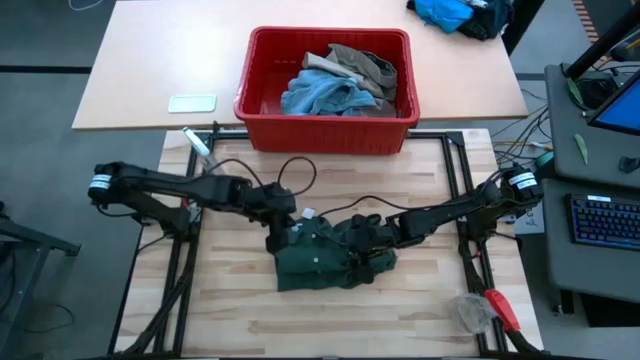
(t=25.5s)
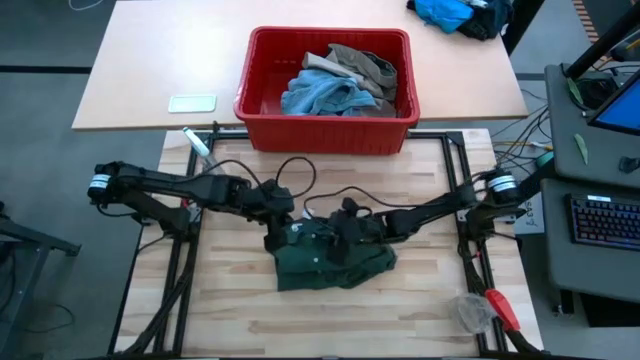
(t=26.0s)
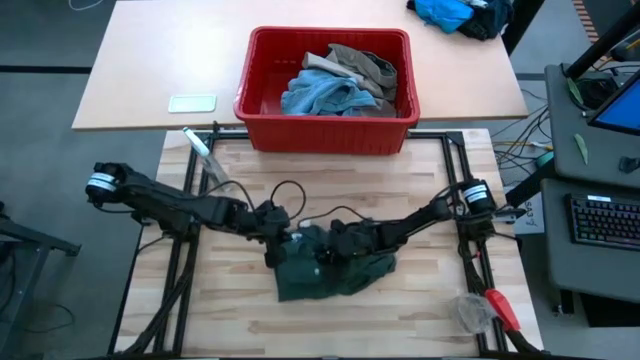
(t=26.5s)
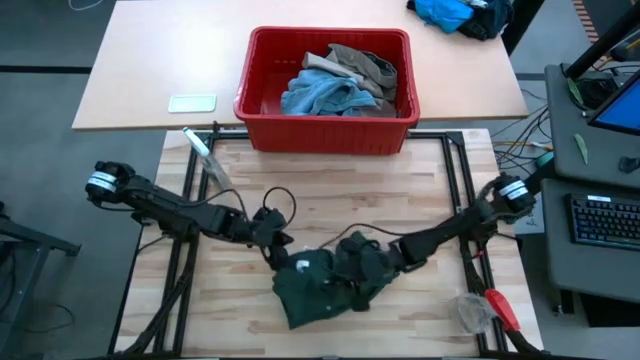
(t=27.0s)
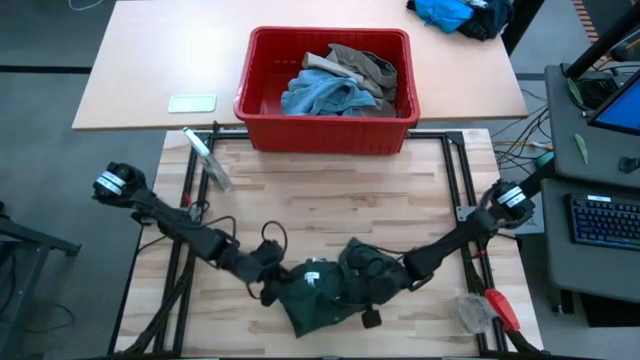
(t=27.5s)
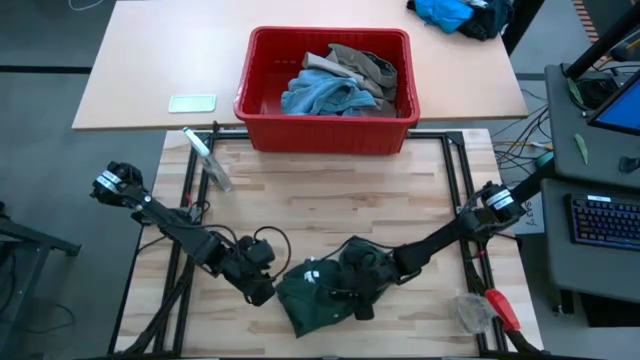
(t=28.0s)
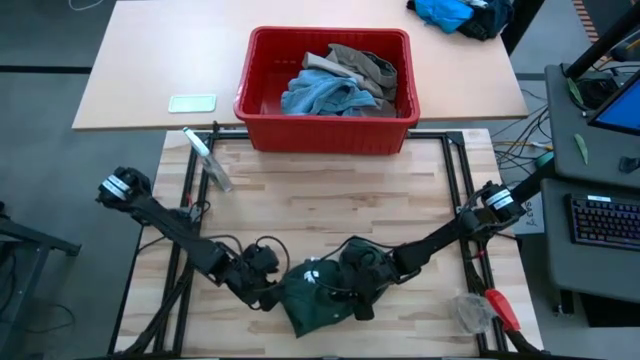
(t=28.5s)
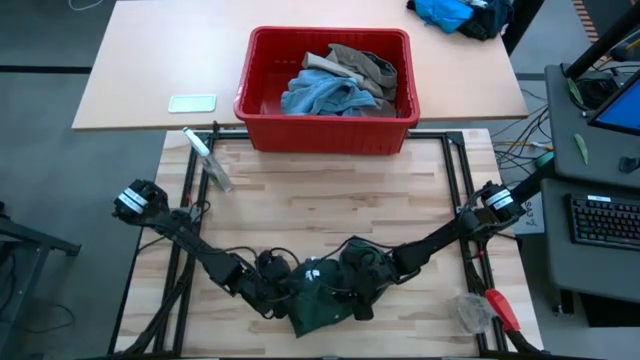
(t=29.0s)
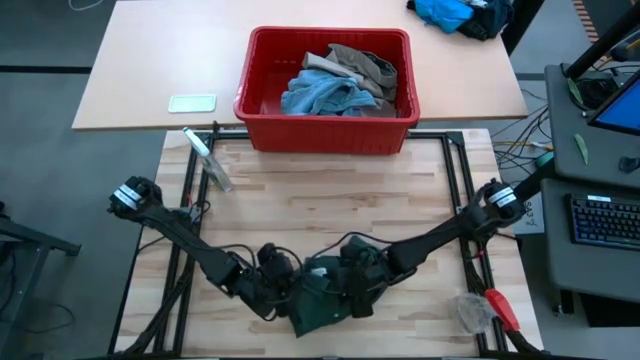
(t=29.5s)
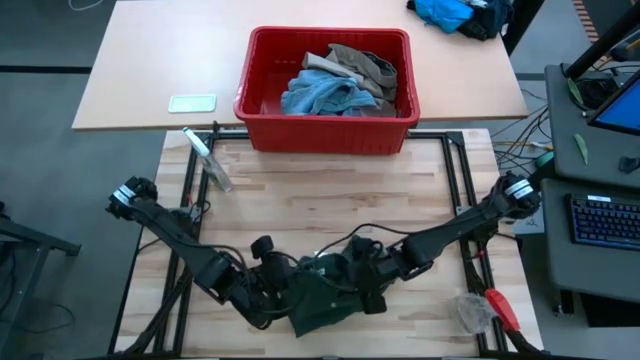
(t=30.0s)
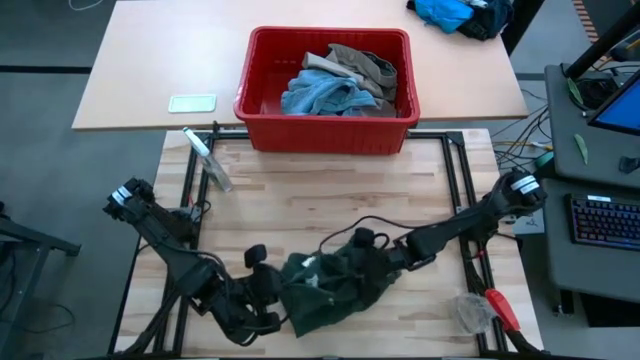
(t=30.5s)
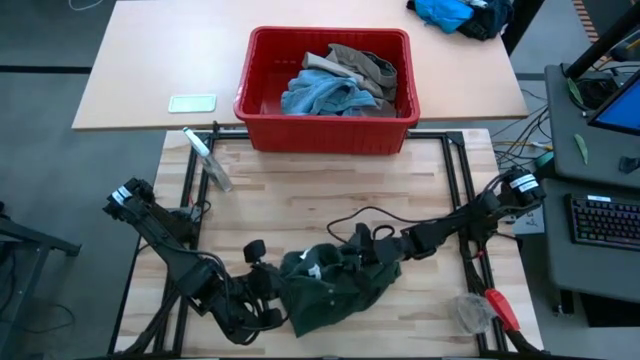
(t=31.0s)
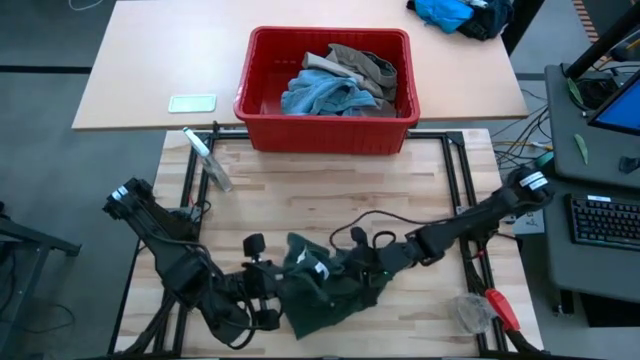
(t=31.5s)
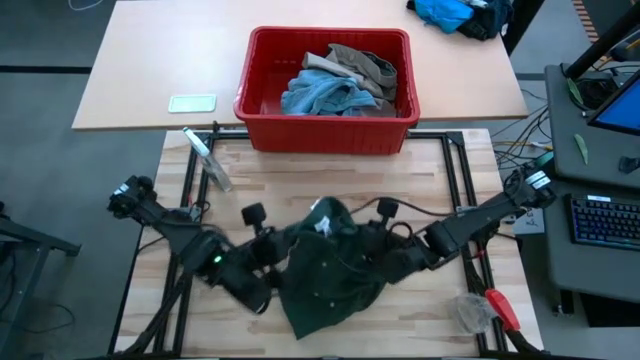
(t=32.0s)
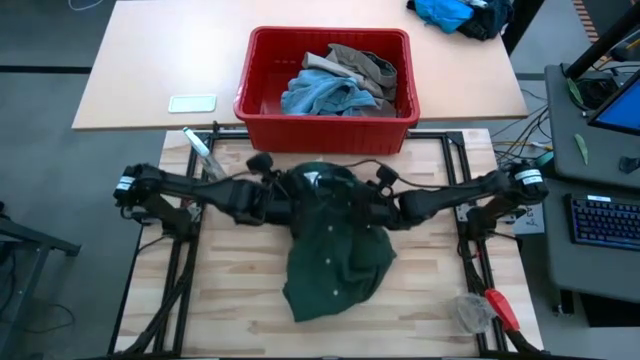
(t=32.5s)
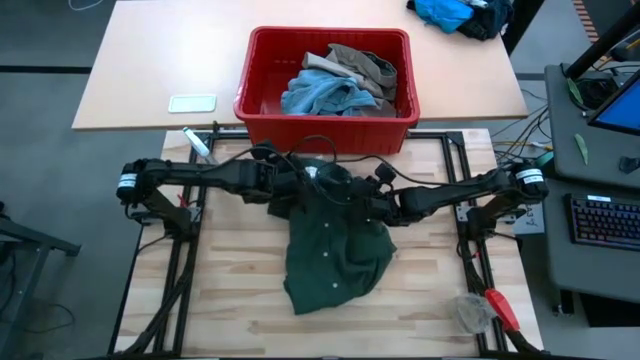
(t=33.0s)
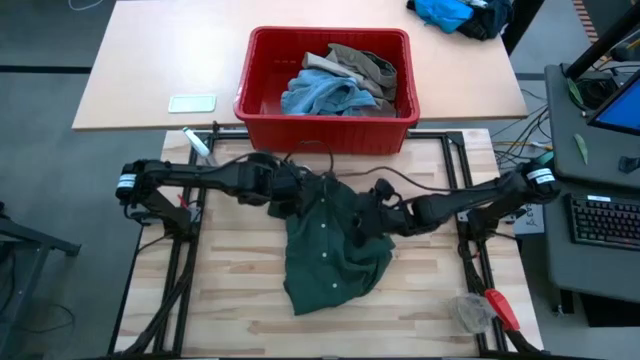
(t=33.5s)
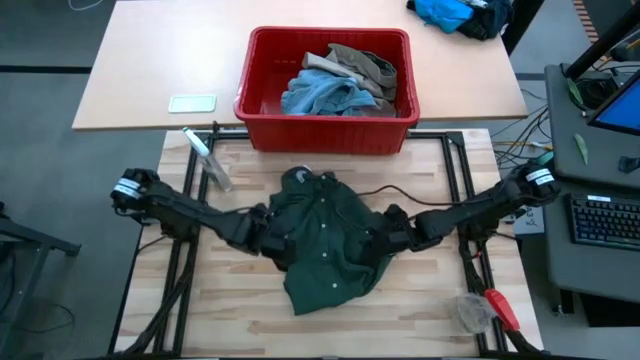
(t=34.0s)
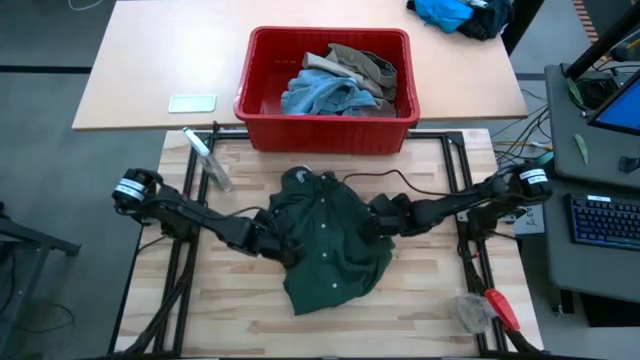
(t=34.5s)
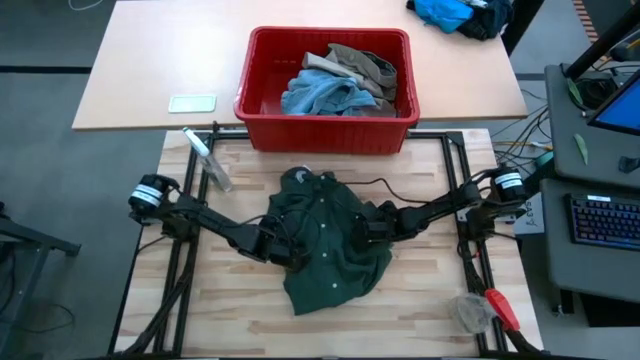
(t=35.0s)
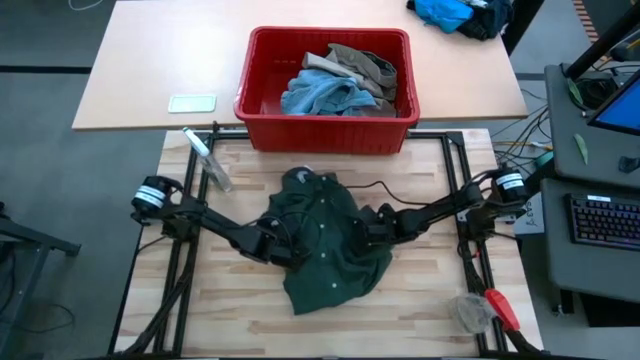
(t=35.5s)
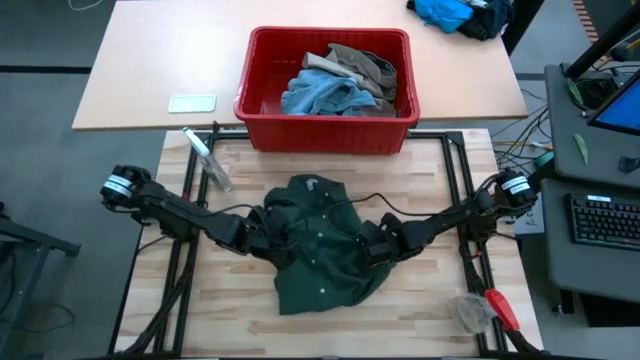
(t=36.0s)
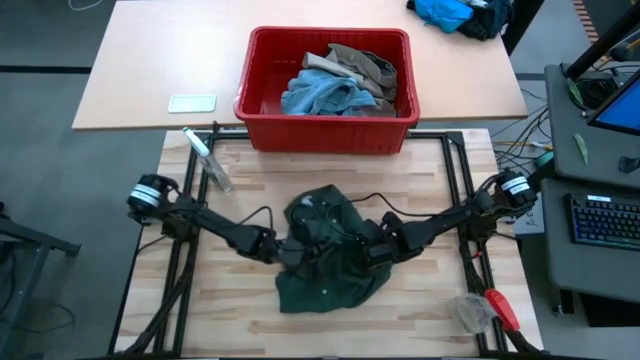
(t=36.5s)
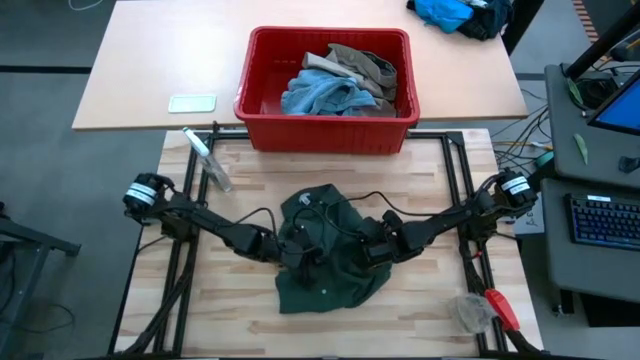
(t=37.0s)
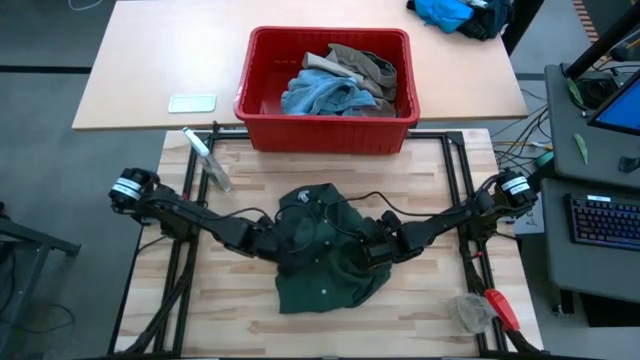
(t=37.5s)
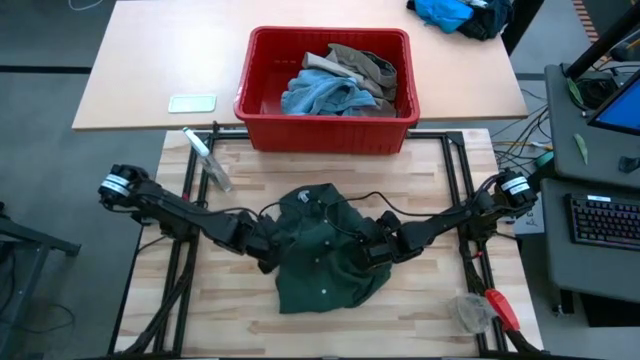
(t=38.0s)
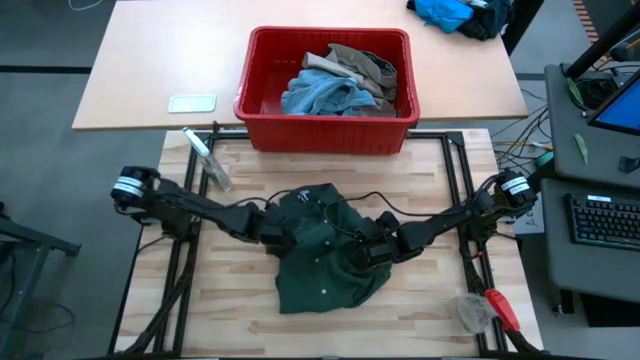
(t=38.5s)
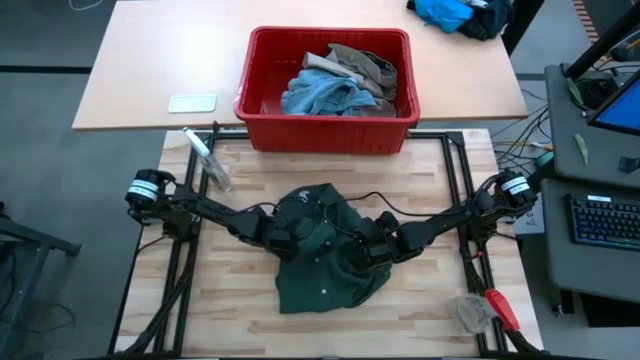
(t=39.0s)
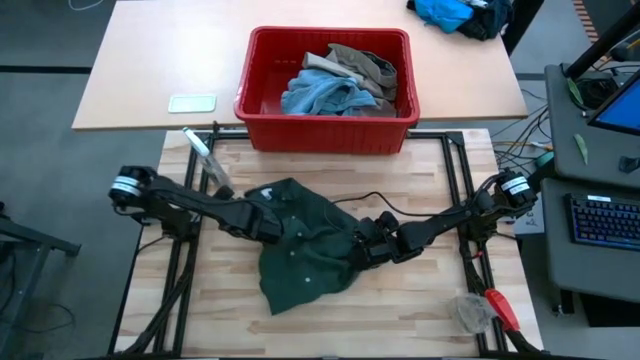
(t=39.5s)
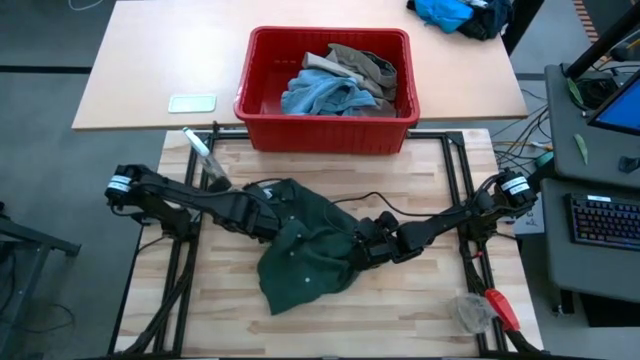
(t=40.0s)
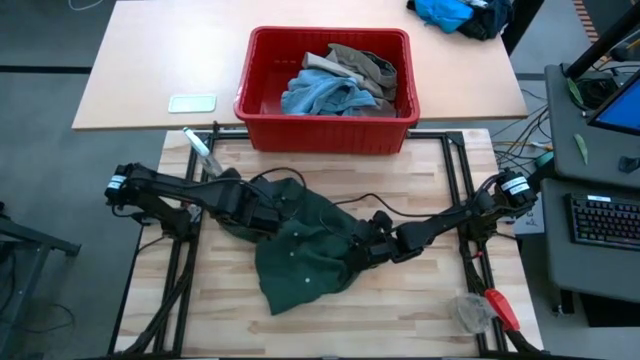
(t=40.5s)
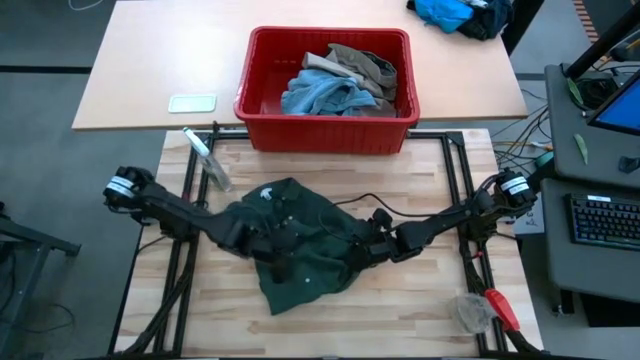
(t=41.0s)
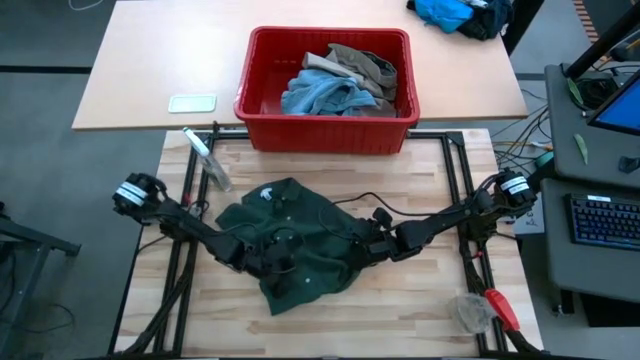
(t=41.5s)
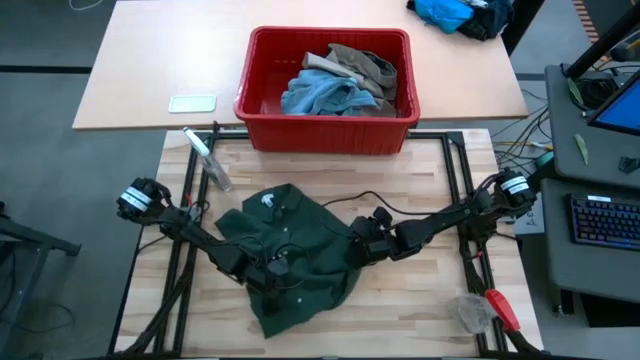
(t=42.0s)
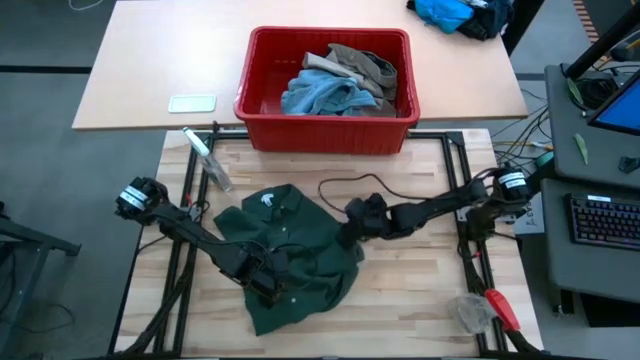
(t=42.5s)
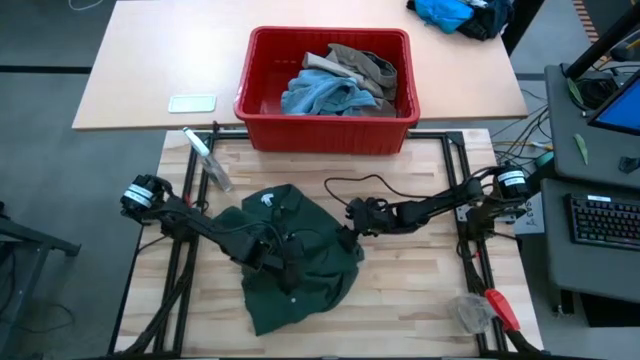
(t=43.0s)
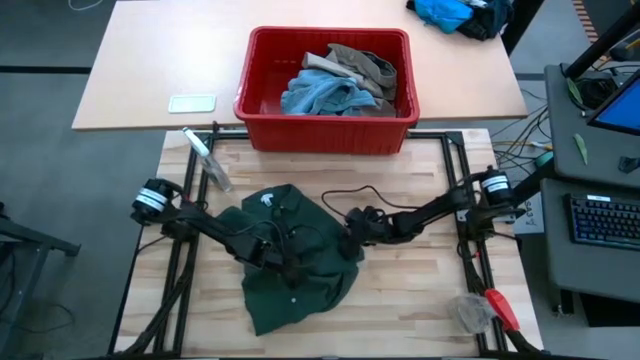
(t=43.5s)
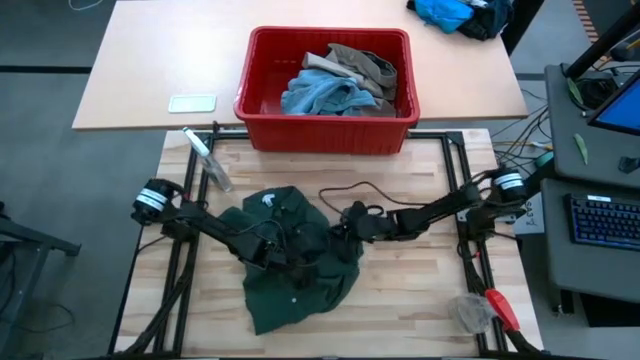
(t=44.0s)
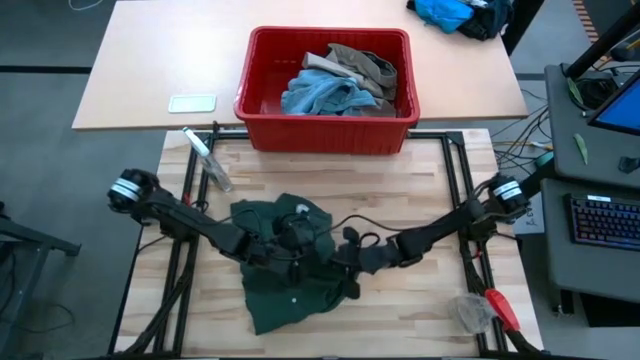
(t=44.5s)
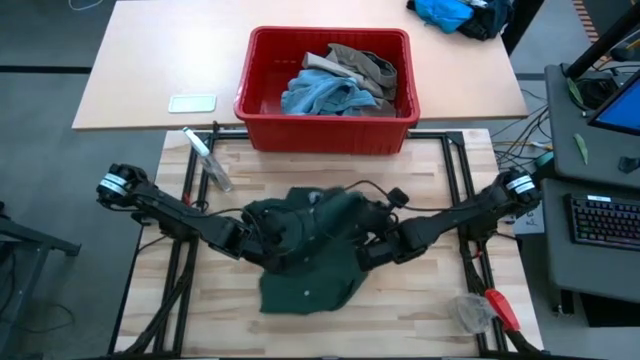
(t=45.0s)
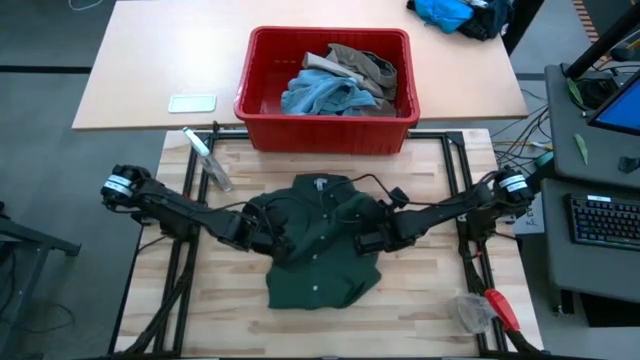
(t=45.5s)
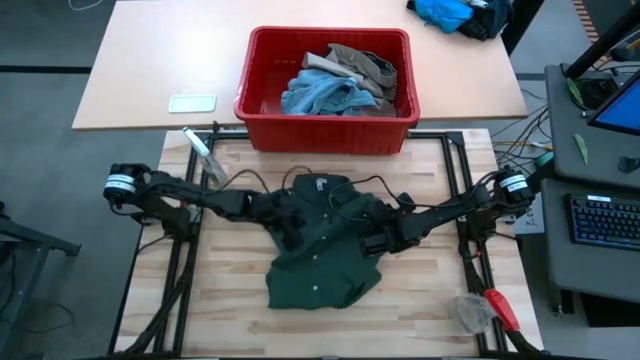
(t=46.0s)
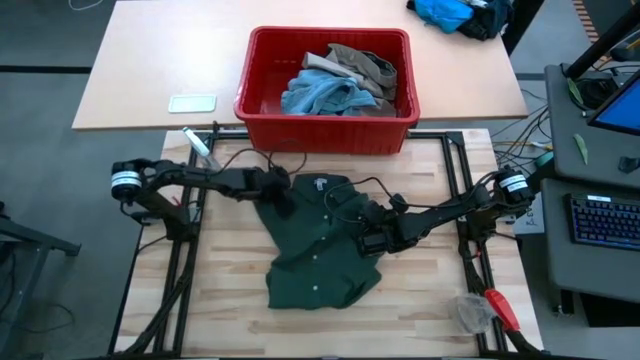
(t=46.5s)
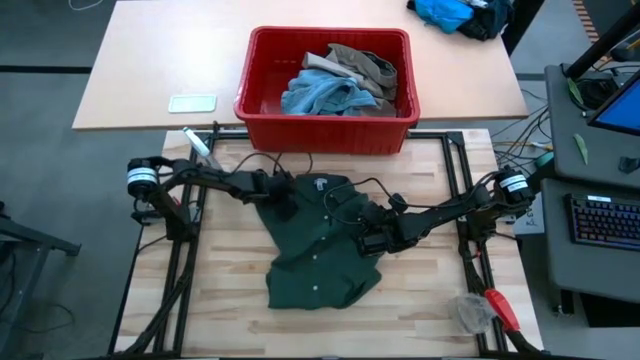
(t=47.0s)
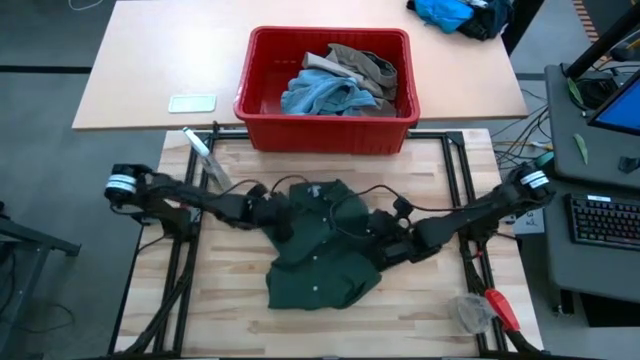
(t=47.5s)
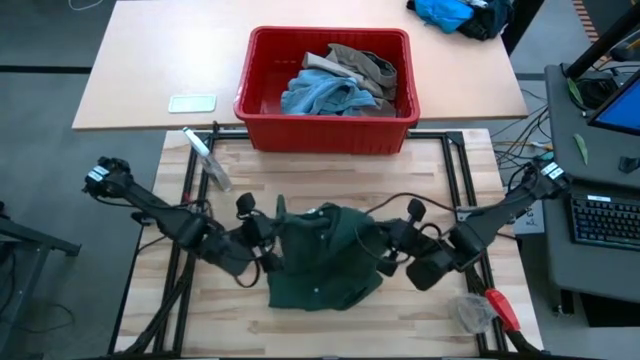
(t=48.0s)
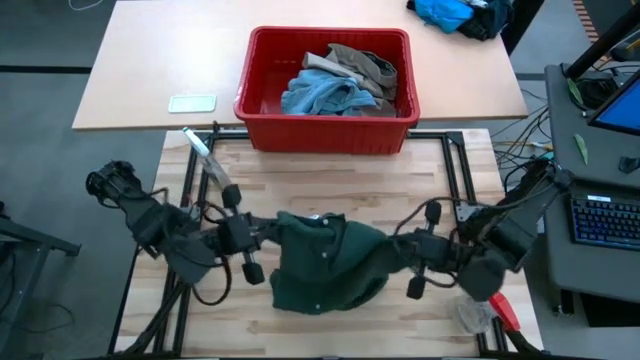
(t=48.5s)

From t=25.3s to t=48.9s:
Task: Fold Laundry from Bin
Fold the green polo shirt
